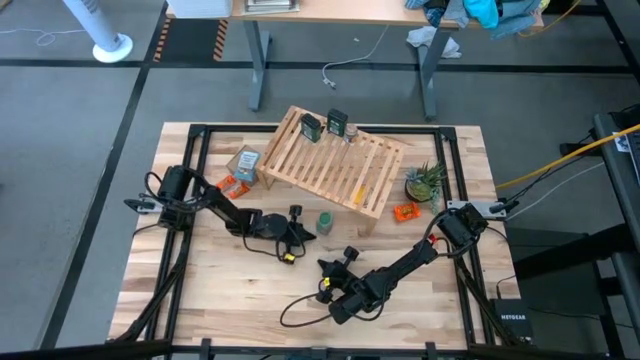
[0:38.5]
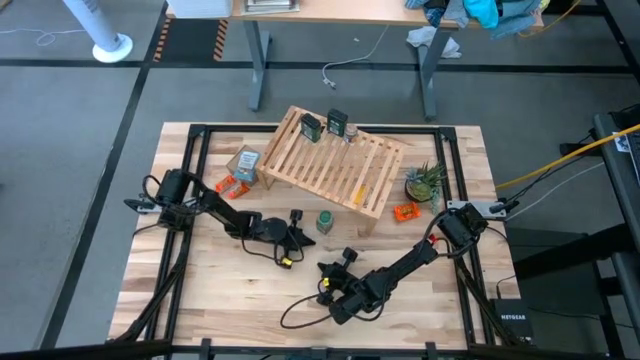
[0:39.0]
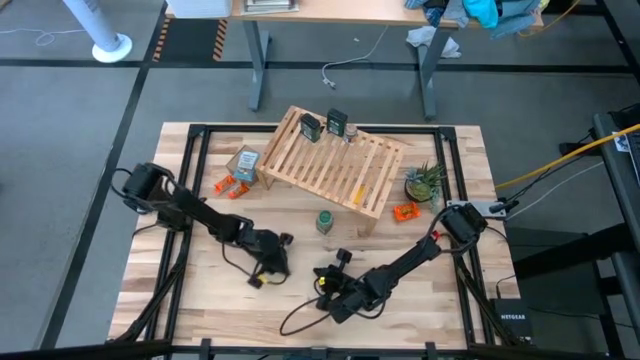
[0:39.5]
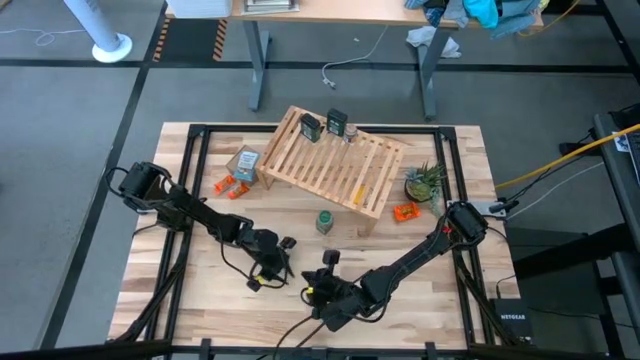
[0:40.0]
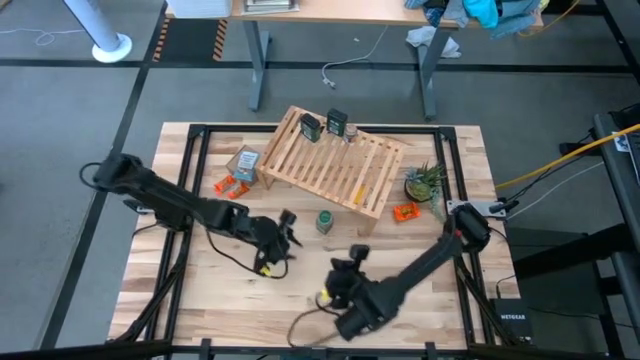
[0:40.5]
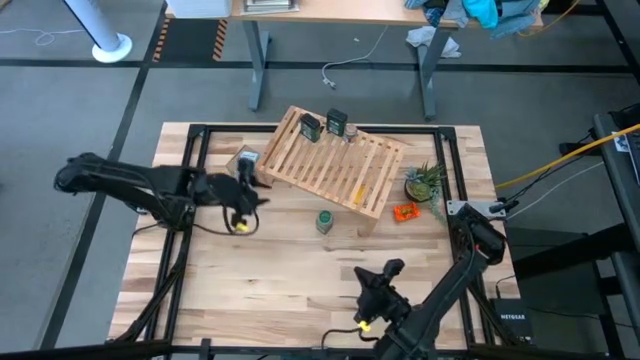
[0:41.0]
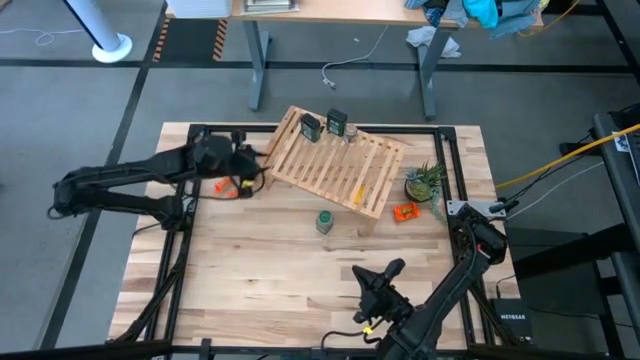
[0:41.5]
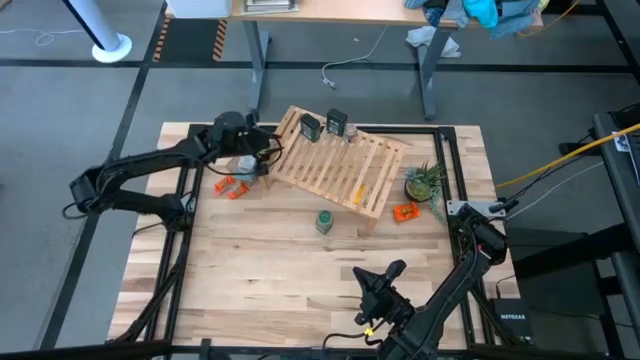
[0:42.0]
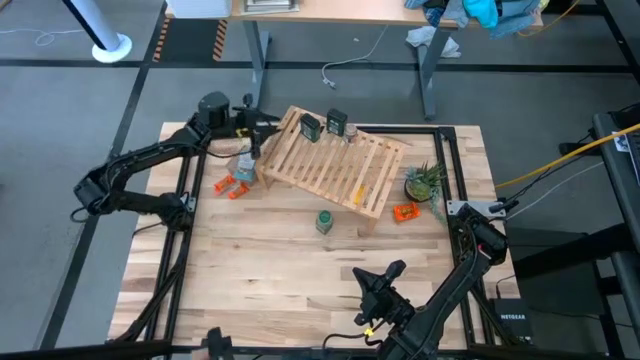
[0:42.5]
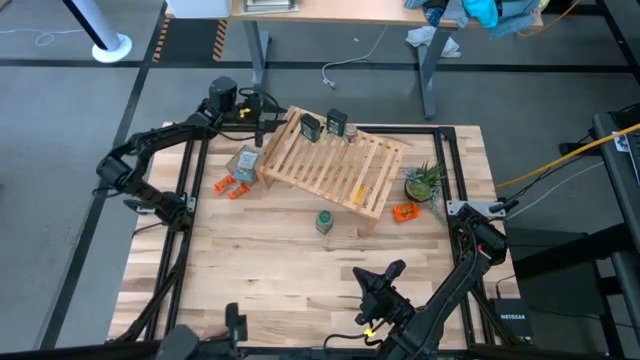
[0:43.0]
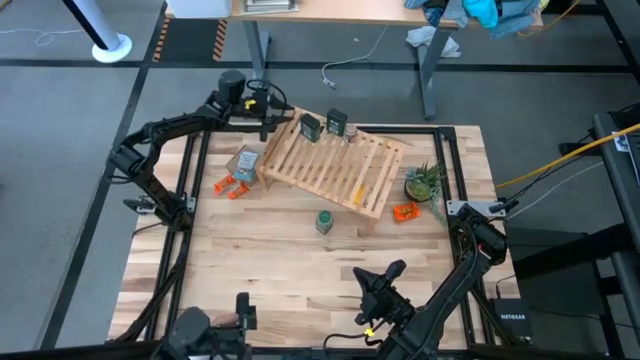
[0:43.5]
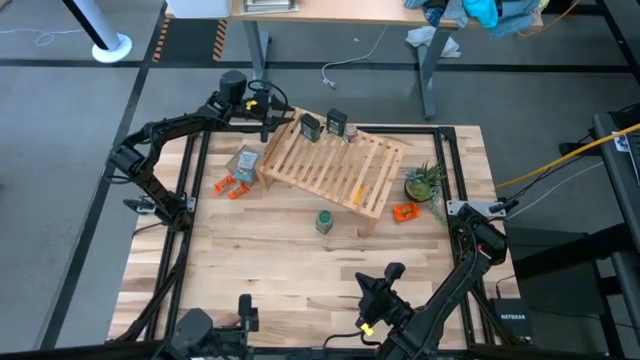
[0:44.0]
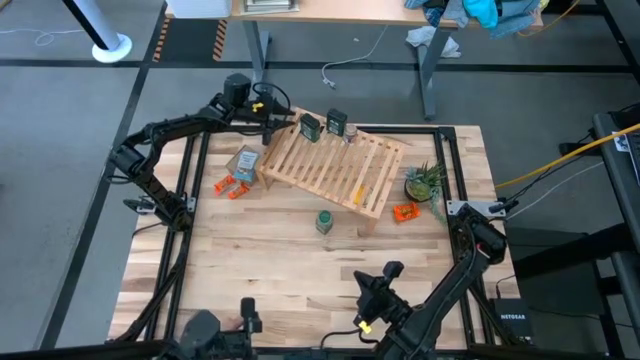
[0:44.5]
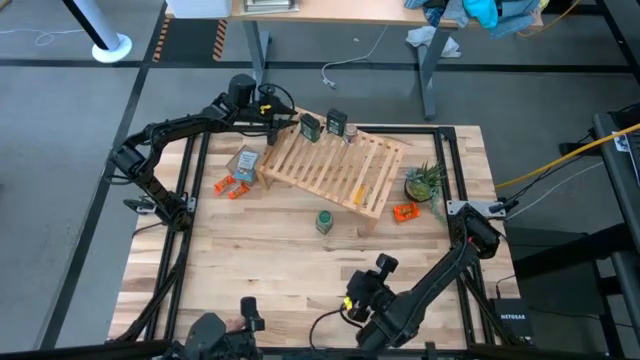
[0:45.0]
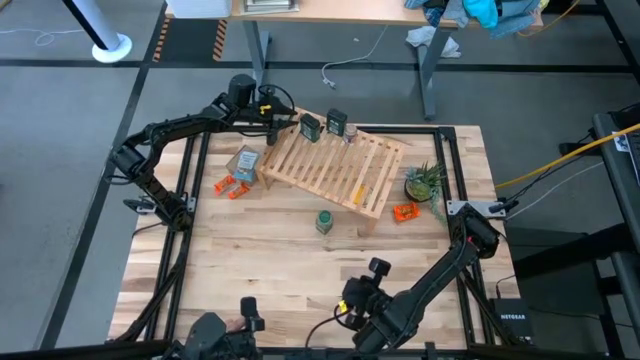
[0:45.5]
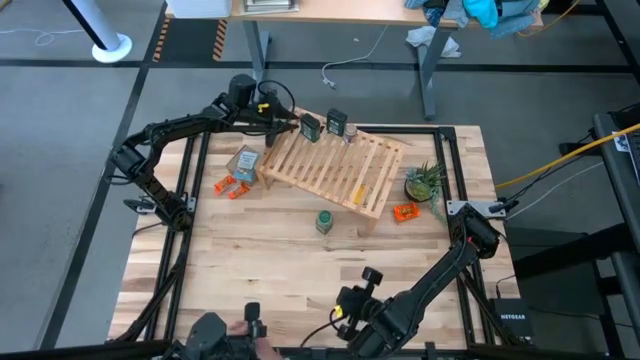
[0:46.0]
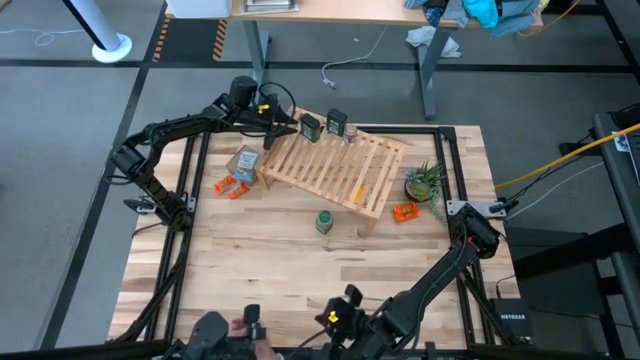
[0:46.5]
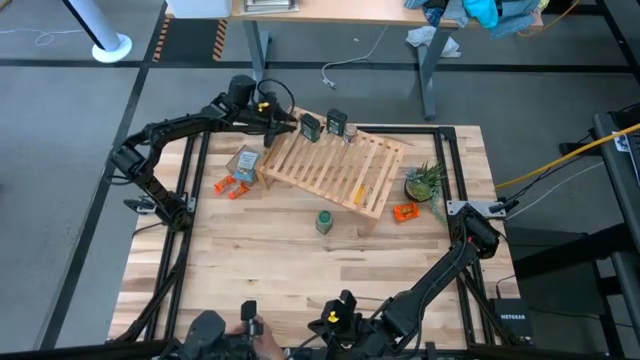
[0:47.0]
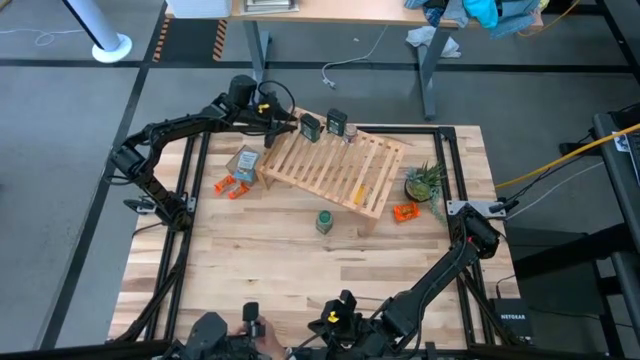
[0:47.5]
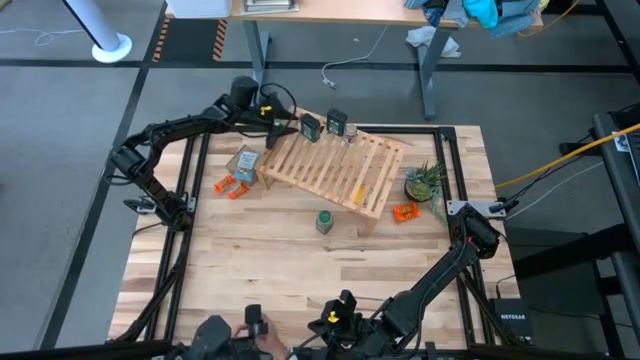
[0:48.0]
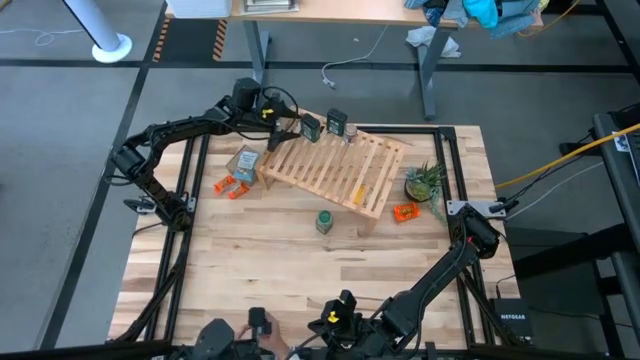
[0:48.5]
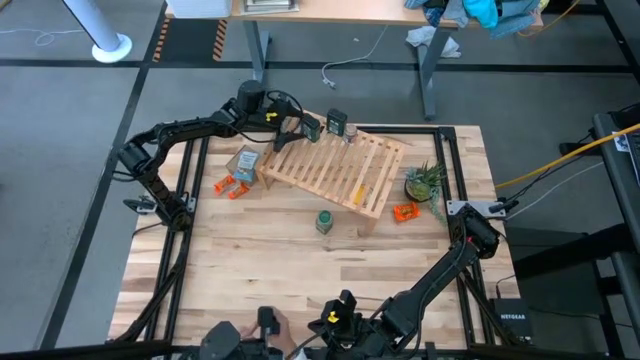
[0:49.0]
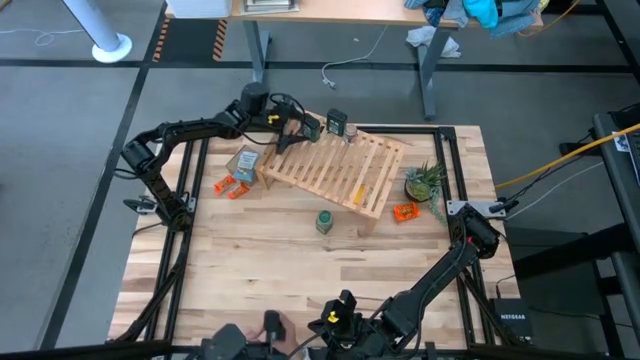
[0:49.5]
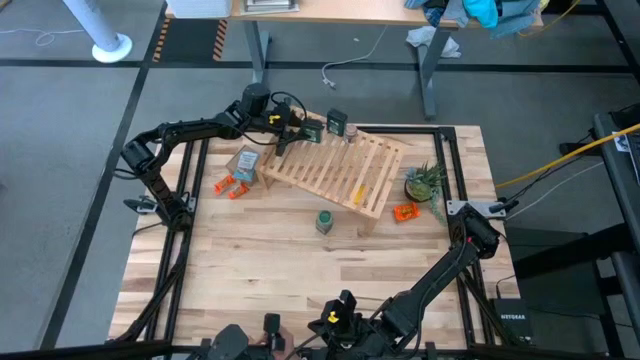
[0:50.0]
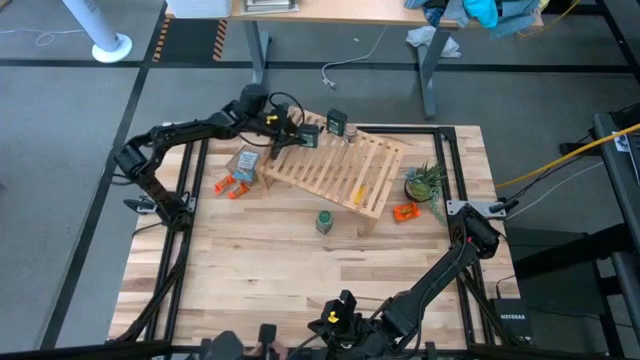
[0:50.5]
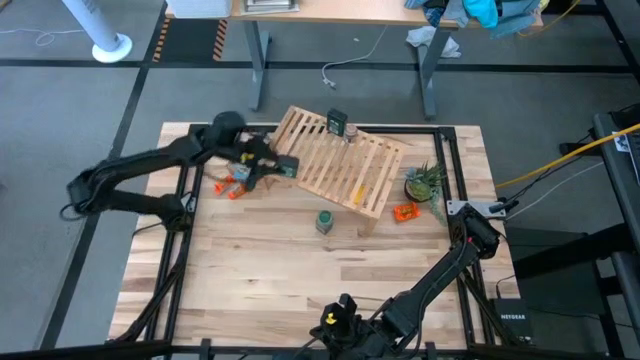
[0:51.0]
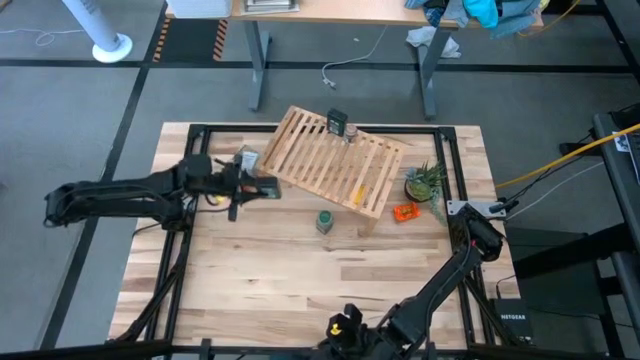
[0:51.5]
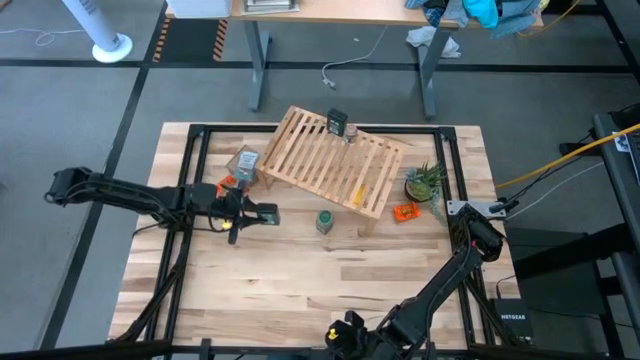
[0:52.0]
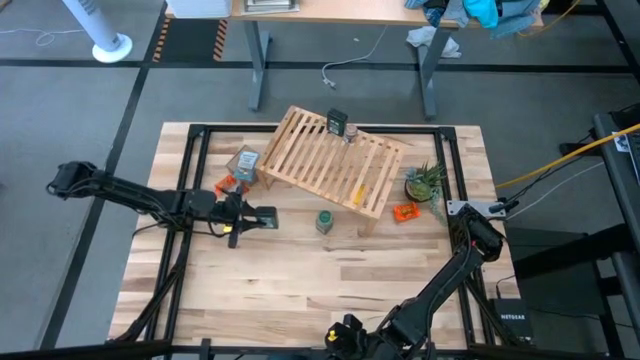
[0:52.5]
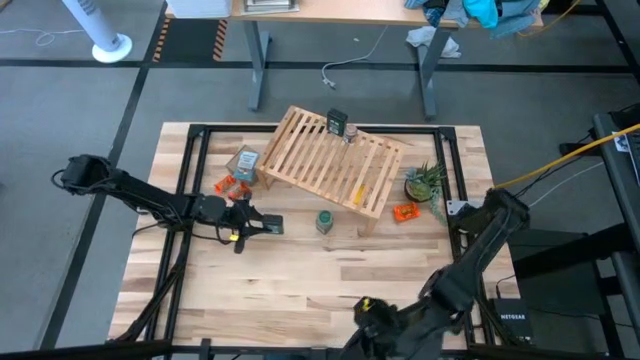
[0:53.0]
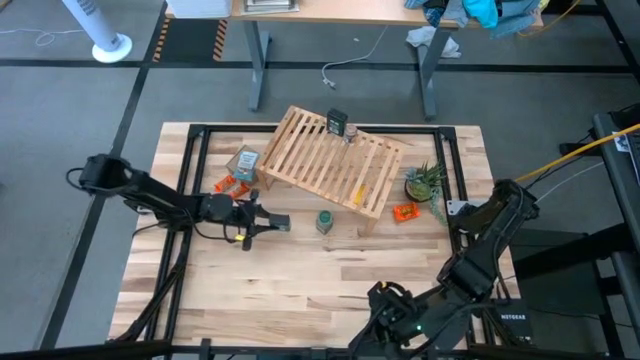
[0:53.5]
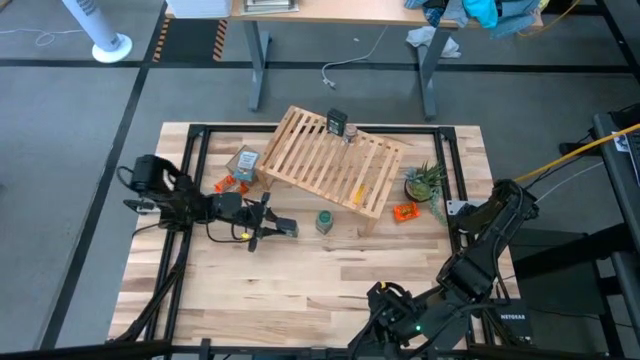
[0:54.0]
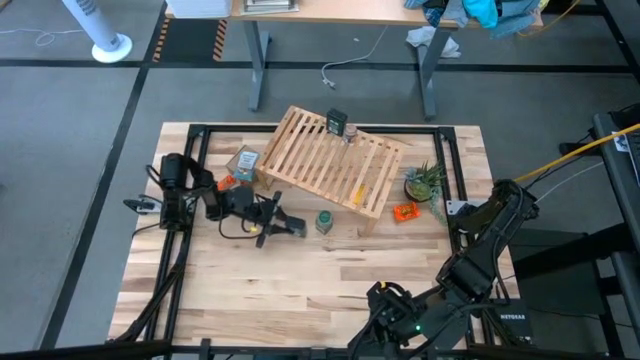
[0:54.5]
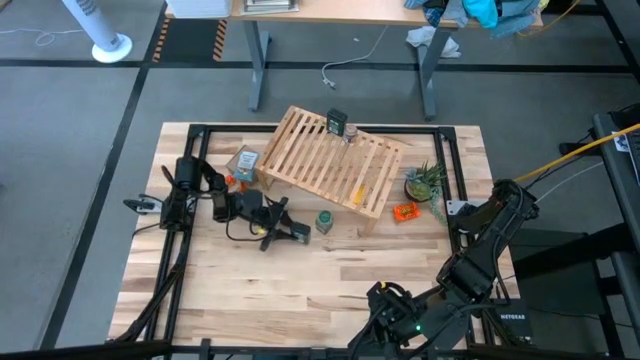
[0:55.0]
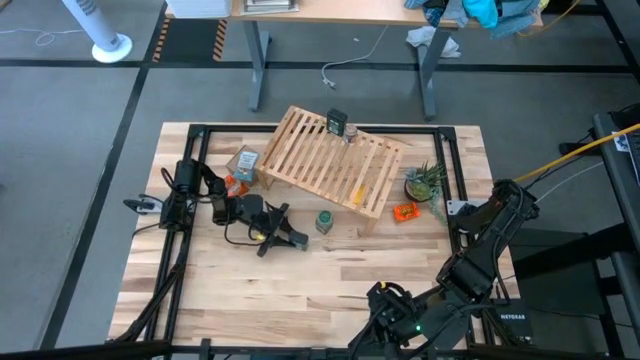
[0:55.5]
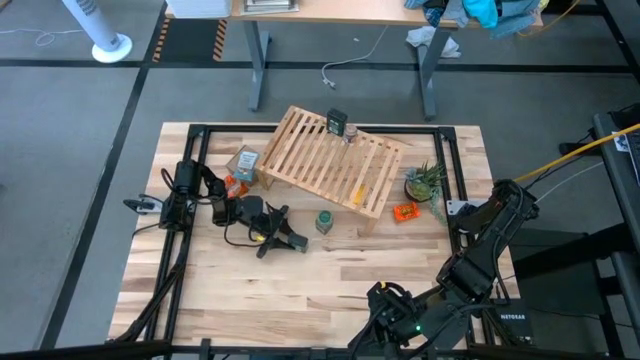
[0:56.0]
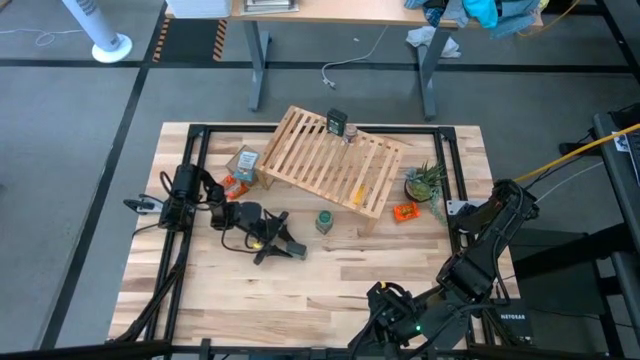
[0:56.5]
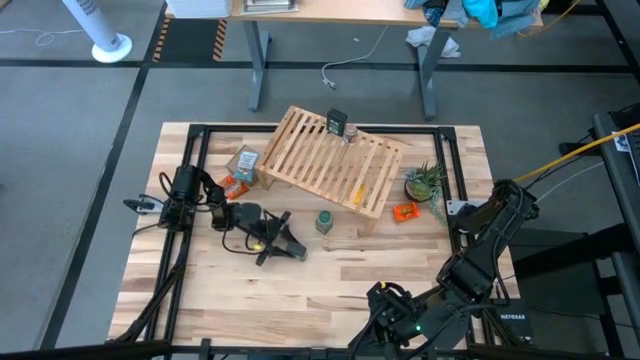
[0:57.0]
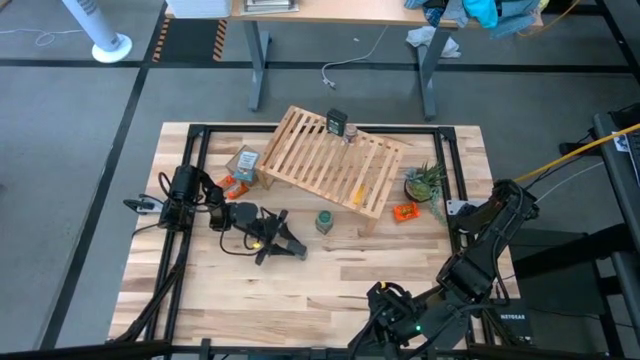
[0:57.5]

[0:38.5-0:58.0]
Task: Shelf spices
Remove the left green seasoning can from the shelf

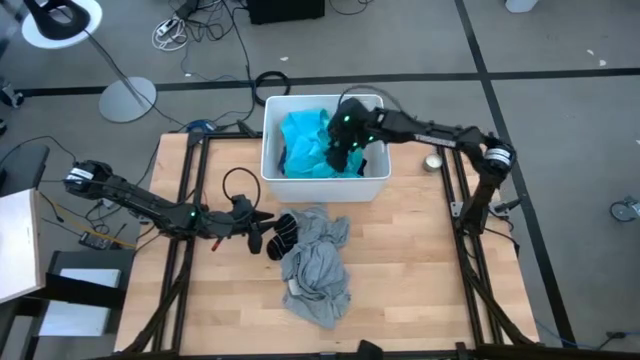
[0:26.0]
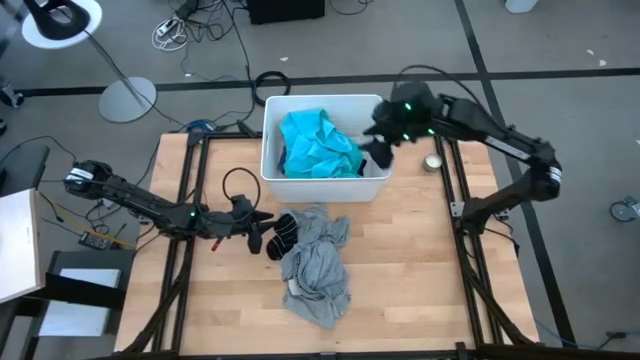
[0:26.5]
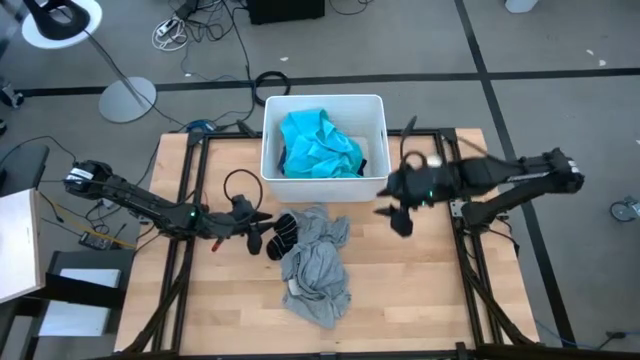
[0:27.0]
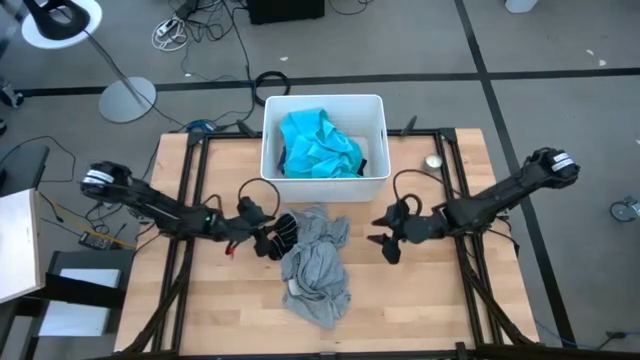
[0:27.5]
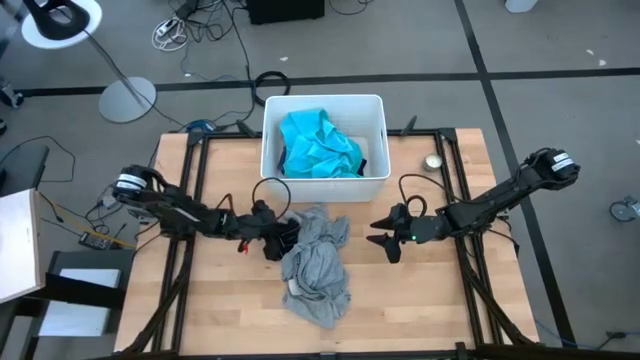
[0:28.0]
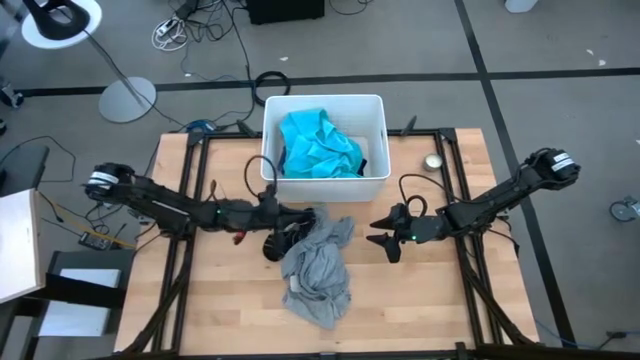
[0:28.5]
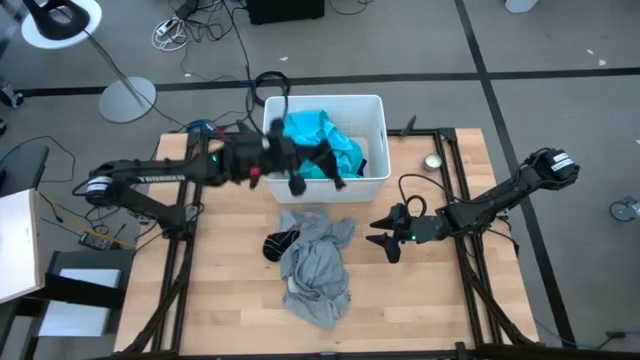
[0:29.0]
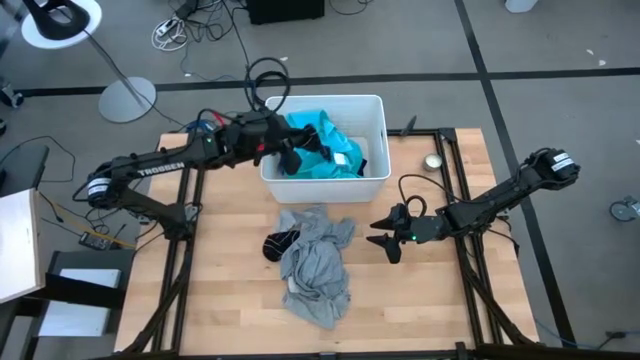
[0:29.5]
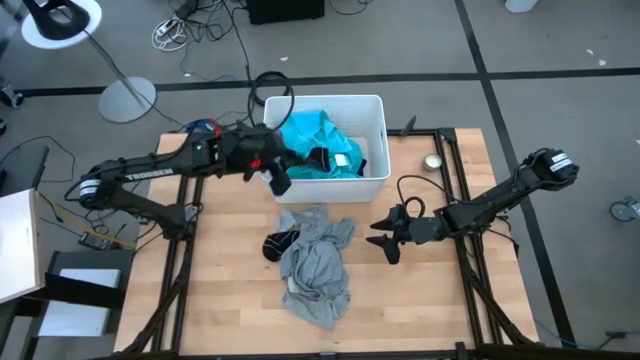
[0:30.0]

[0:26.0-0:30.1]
Task: Sort clothes
Put the top black sock into the white bin
